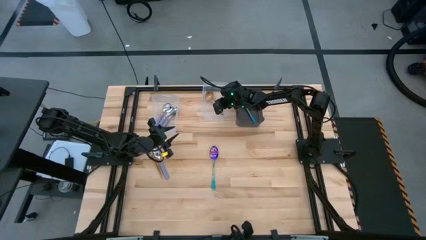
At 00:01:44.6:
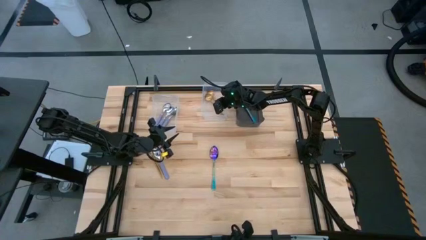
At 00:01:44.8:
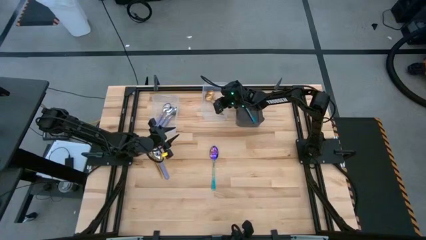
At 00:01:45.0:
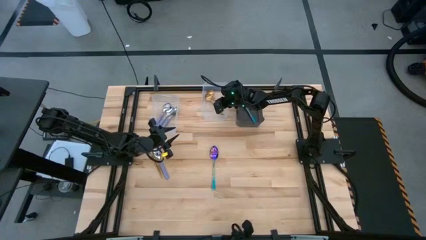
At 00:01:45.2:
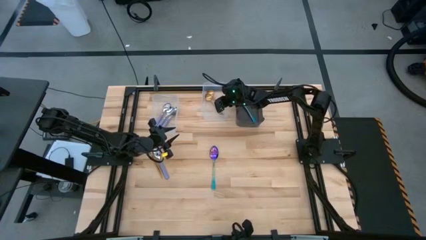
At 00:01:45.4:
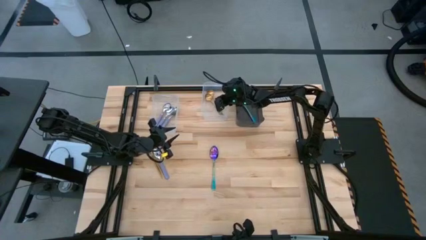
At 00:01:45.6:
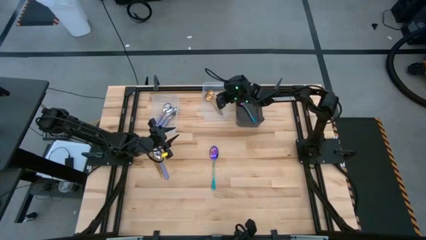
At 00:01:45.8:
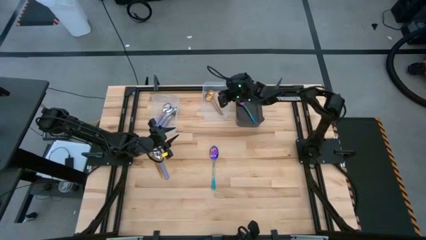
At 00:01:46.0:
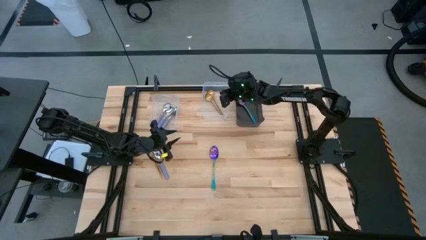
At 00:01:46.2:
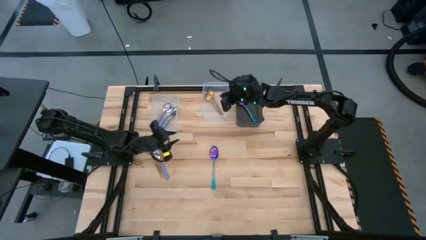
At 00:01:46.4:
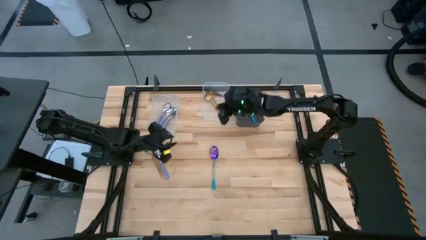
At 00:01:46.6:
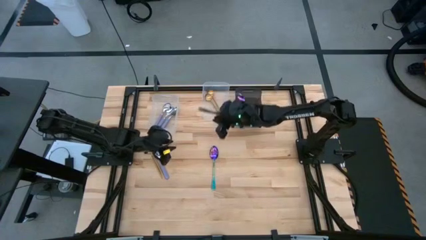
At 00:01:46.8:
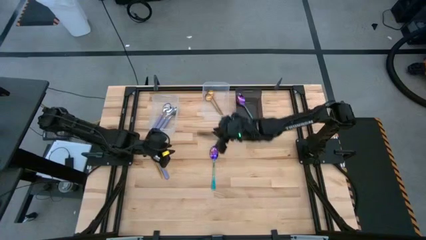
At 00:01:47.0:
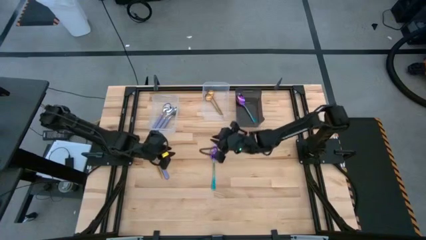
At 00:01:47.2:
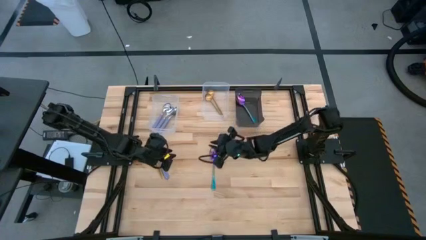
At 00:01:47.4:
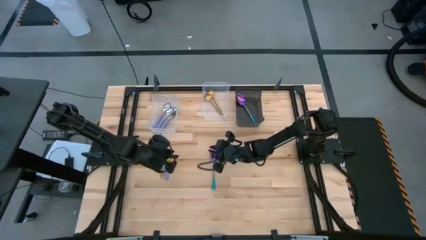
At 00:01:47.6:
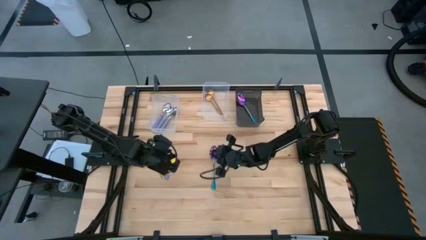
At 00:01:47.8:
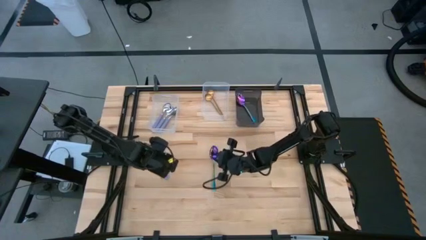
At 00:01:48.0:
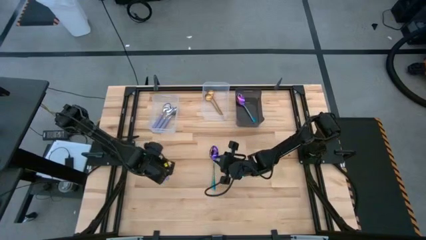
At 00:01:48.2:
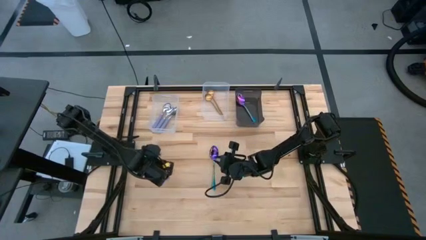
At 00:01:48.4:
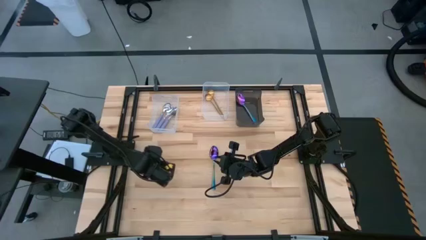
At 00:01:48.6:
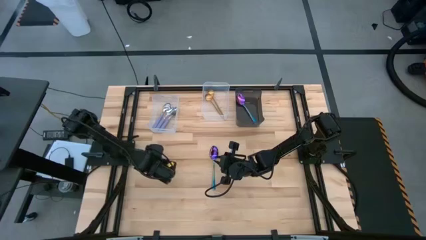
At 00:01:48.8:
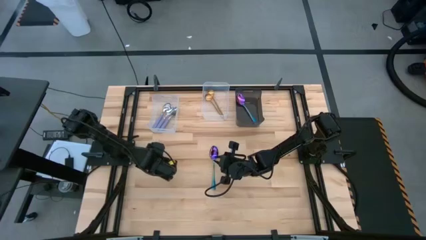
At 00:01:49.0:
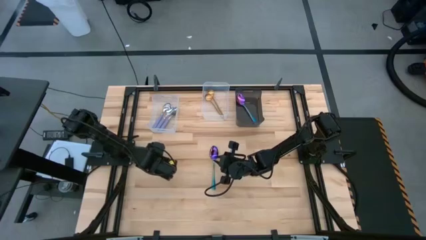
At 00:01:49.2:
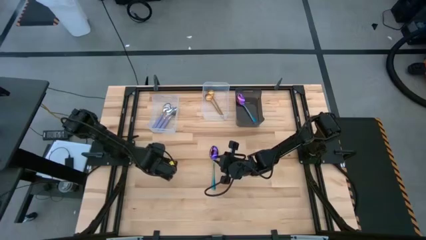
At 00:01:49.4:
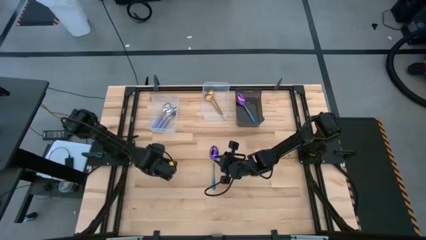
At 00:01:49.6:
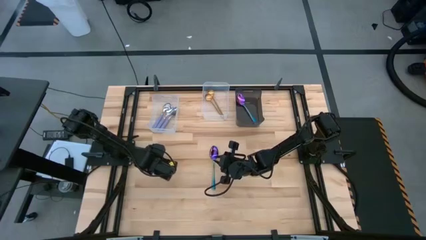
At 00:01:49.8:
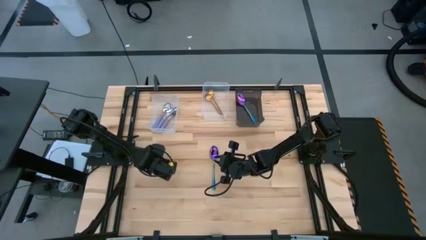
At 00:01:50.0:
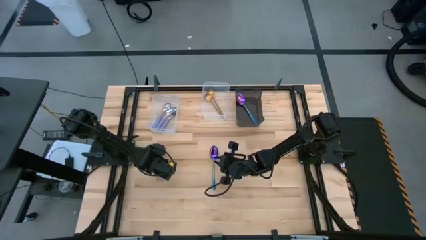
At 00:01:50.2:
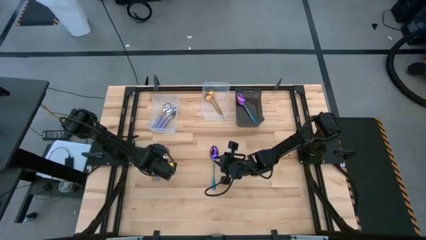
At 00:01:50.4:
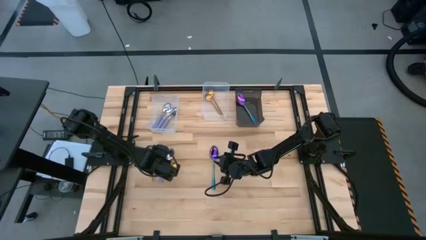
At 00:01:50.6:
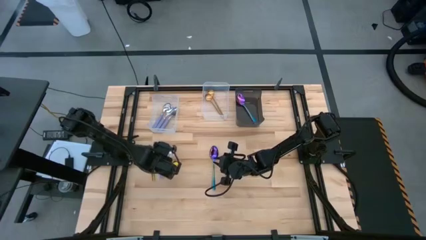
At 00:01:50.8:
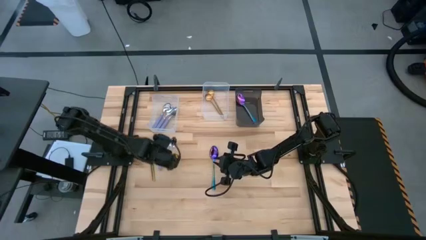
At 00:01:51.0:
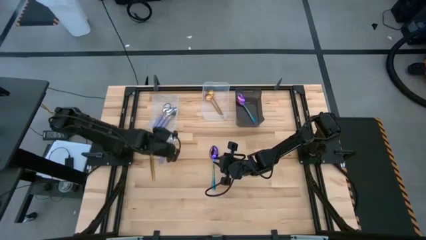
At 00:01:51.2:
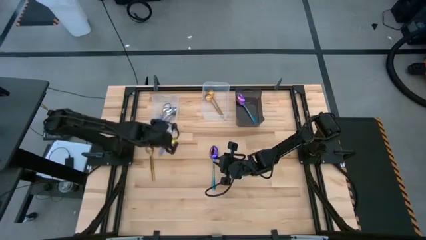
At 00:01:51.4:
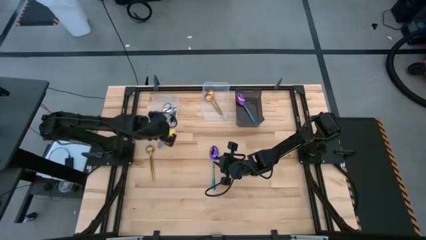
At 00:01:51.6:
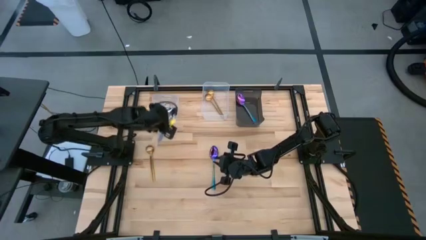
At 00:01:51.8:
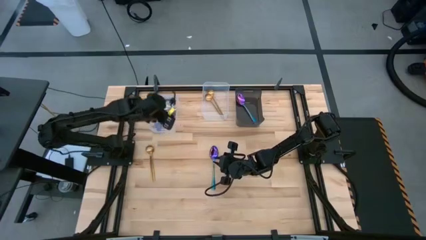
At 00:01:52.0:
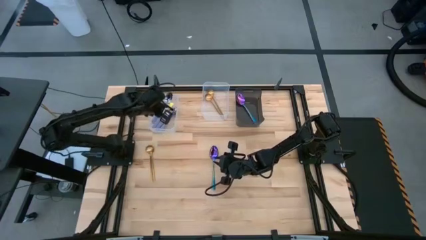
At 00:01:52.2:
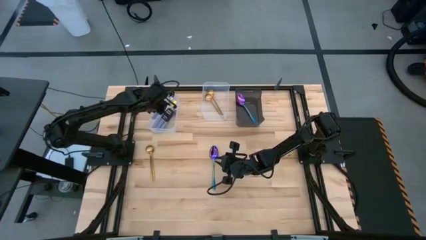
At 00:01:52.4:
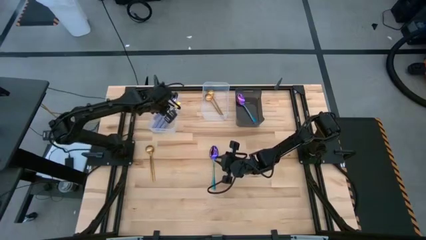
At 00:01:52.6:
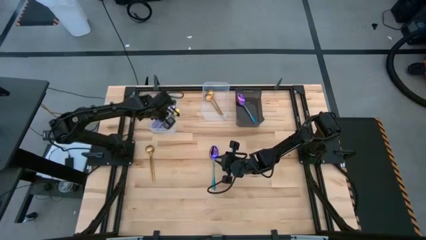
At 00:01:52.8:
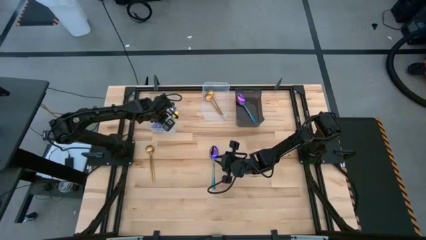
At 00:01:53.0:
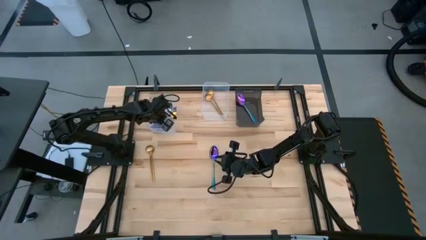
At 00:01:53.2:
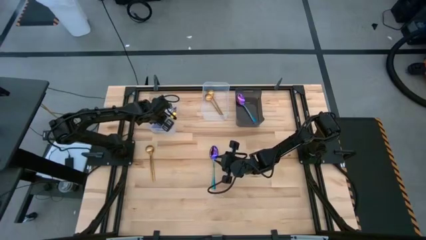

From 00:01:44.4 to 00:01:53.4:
Task: Sort silverware by color (type)
Put the purple spoon into the left transparent bin

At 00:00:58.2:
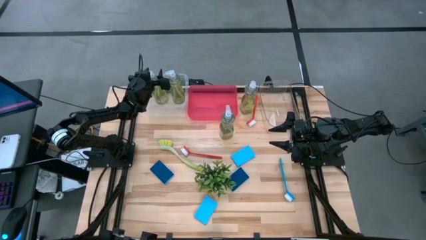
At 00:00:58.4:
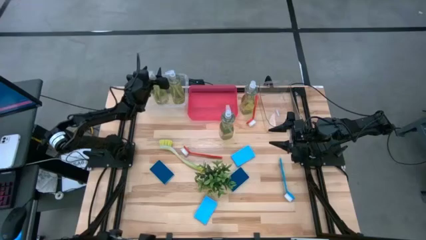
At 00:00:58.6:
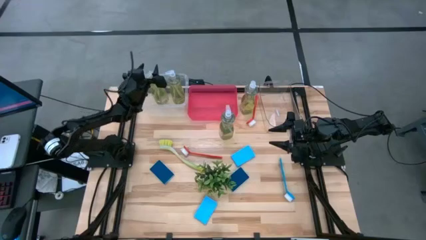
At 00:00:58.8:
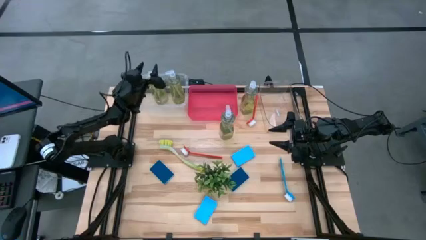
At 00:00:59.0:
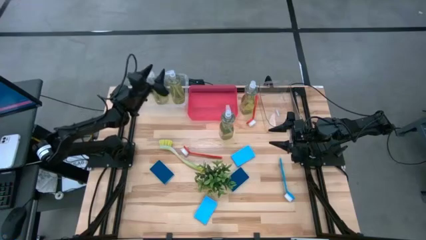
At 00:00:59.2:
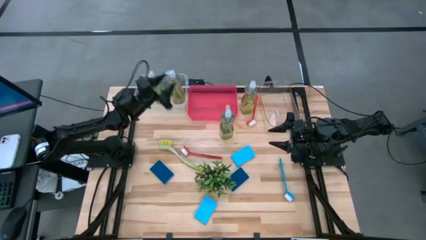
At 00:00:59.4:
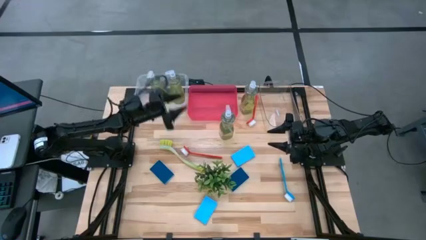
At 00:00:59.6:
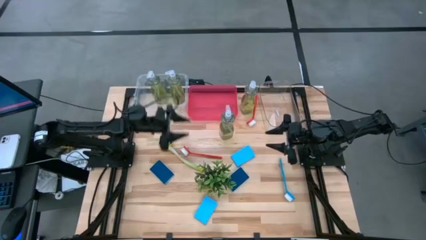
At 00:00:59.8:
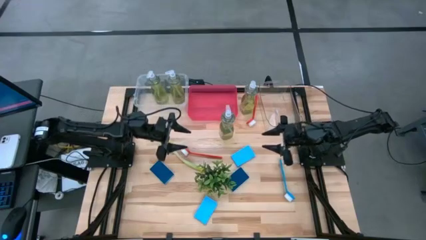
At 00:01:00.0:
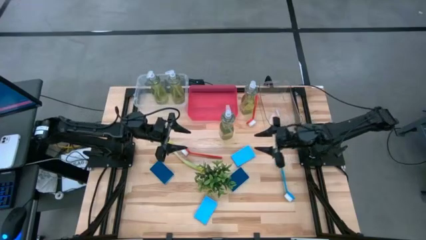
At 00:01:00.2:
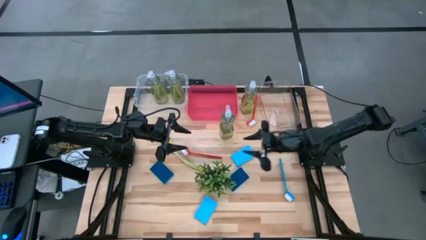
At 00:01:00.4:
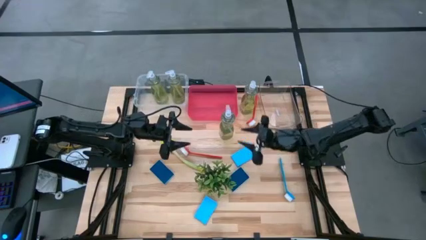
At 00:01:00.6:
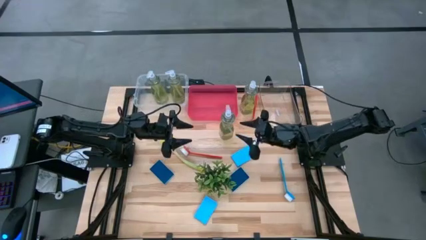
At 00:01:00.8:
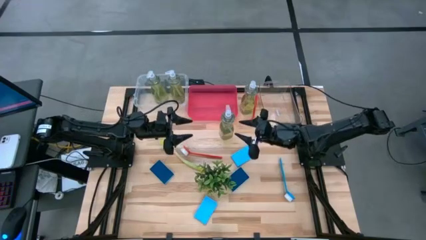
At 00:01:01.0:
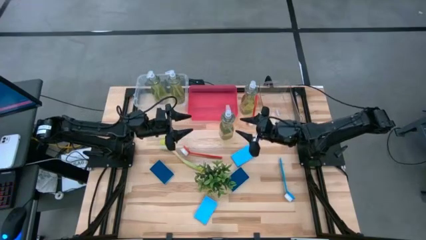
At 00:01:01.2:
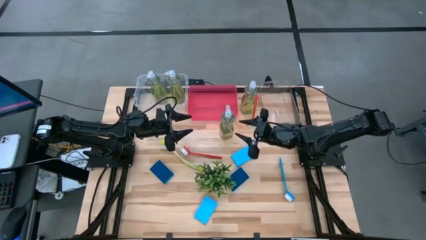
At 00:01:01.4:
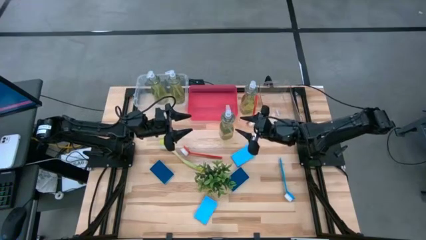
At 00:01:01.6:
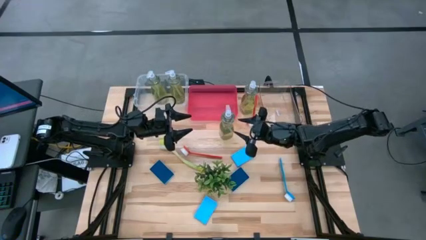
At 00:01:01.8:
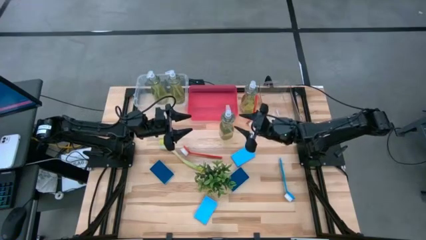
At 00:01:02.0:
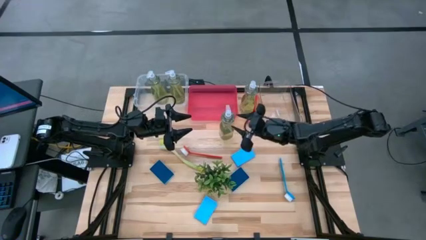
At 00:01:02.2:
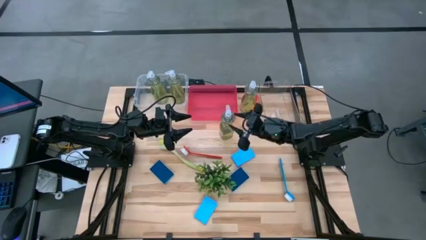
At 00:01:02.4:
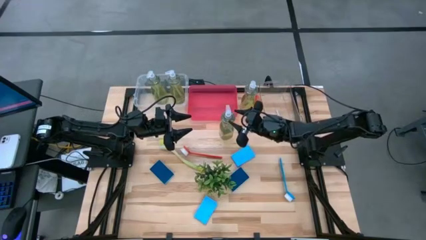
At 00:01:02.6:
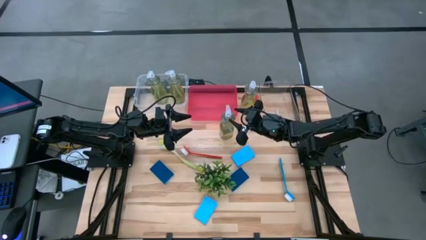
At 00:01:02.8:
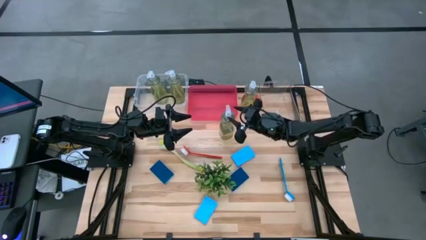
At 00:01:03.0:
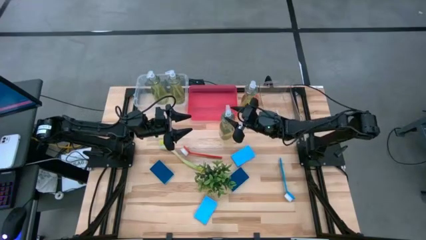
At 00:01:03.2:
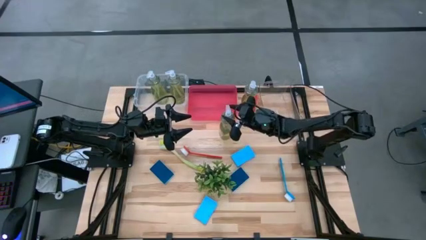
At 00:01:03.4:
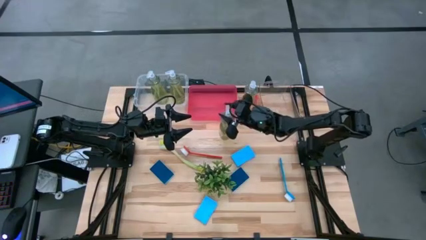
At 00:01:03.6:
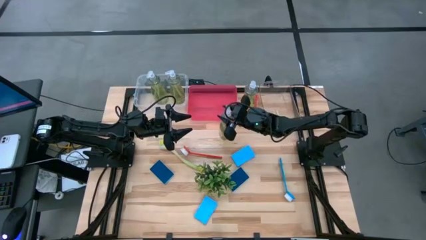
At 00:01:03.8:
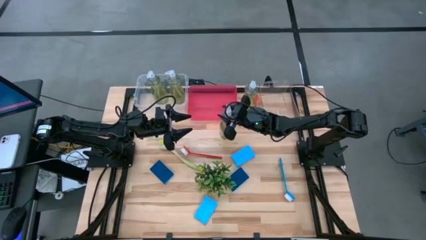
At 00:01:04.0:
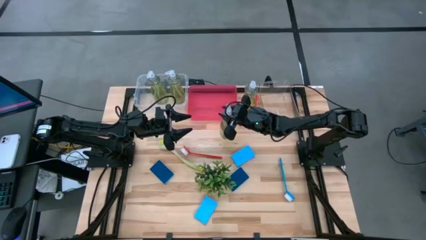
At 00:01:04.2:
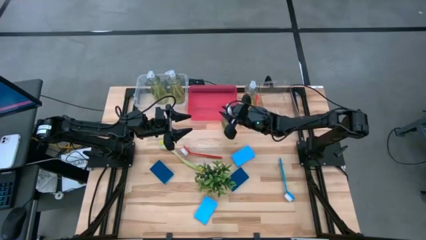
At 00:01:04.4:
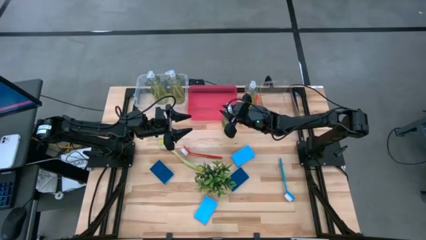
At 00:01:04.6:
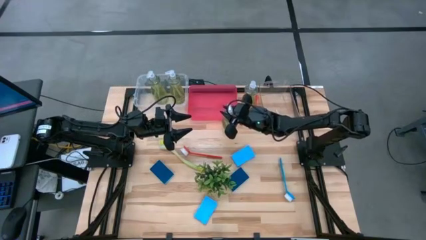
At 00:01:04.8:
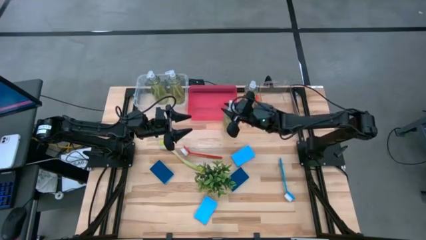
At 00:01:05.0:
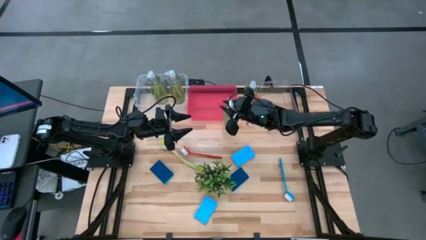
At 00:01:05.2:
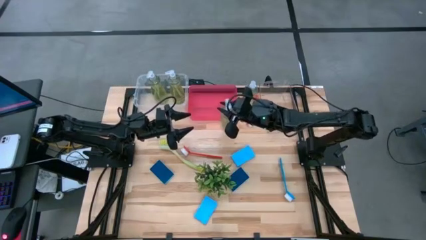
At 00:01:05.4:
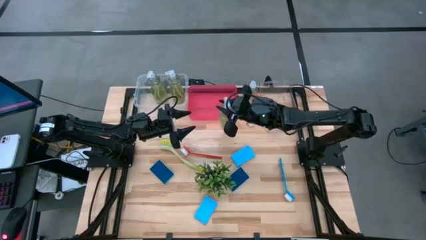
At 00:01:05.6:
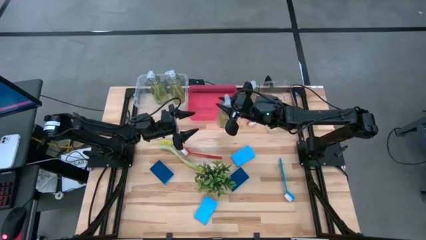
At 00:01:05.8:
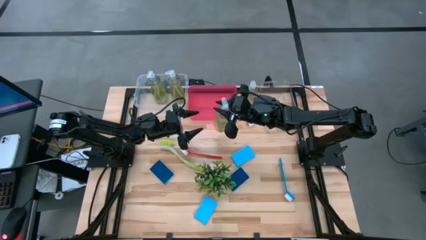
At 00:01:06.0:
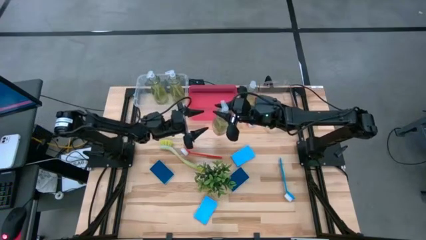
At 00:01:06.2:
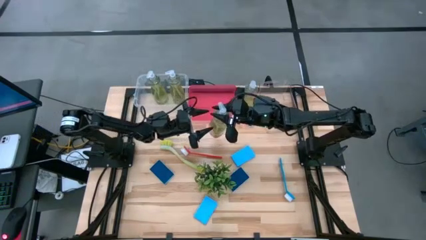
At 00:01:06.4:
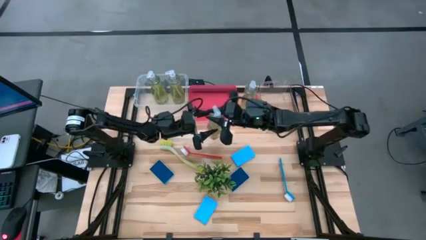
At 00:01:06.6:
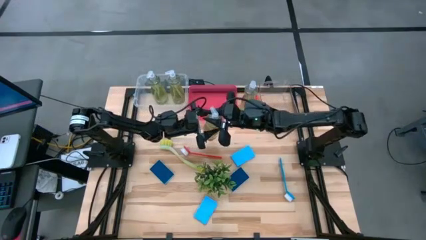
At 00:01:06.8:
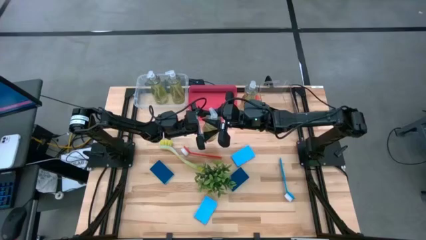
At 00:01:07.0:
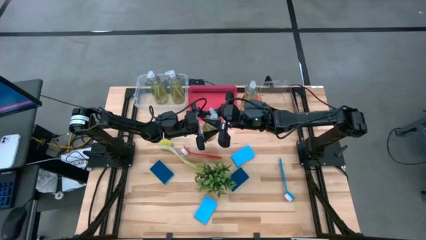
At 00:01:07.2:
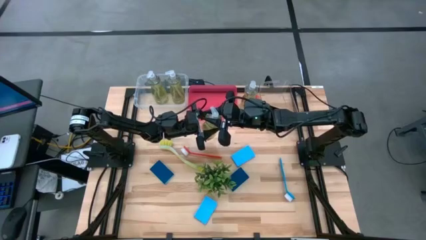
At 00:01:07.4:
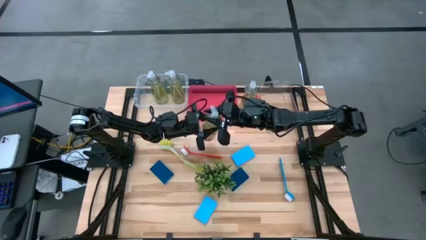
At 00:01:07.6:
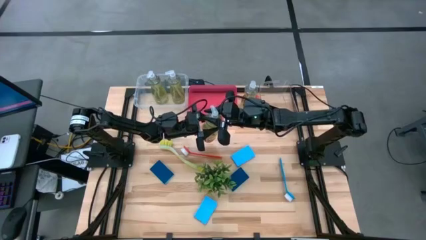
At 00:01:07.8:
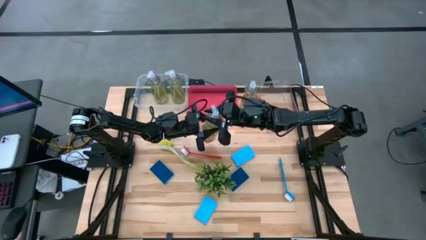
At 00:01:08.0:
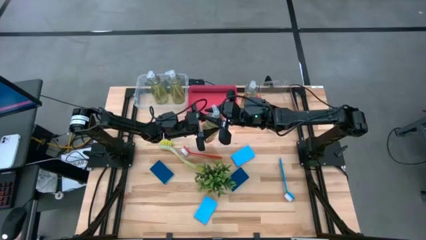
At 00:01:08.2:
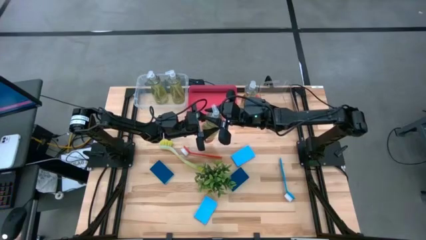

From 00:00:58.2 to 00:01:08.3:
Task: Pick & Place Kitchen Sink Supplies
Put the yellow dishwashing liquid into the white bin
